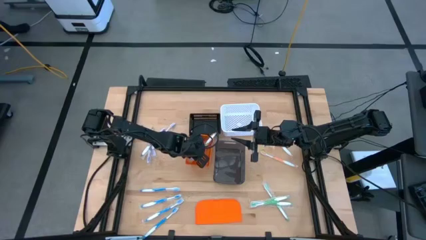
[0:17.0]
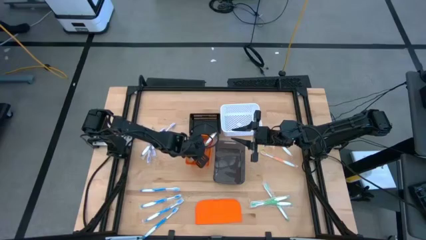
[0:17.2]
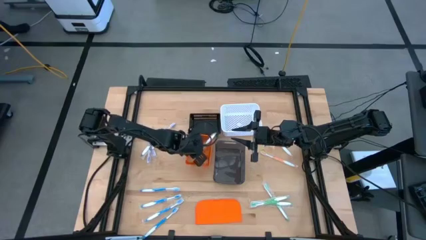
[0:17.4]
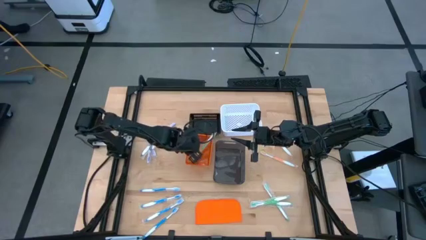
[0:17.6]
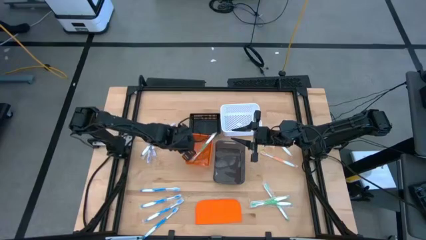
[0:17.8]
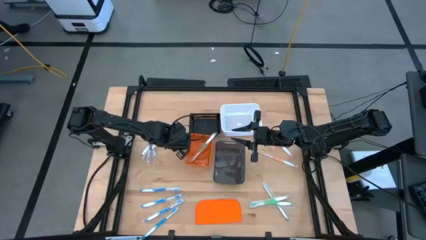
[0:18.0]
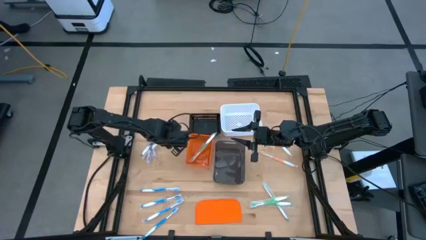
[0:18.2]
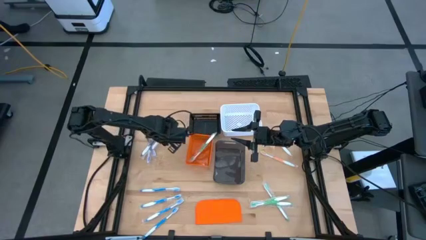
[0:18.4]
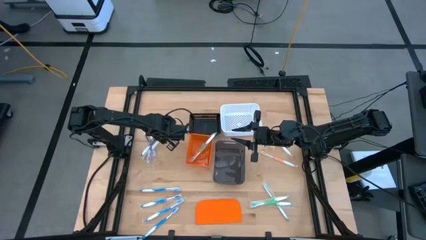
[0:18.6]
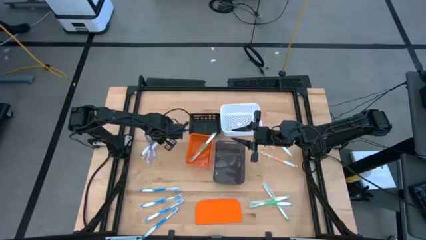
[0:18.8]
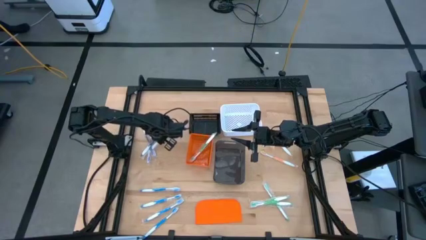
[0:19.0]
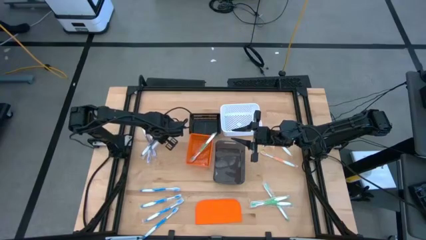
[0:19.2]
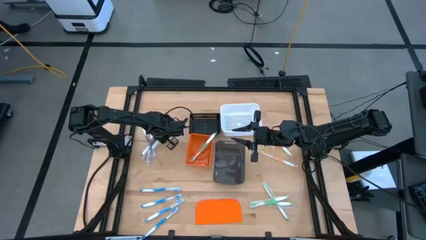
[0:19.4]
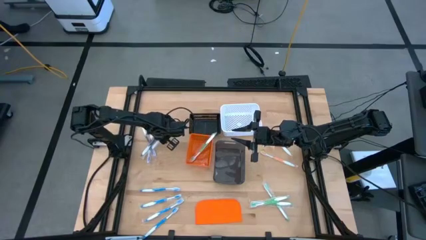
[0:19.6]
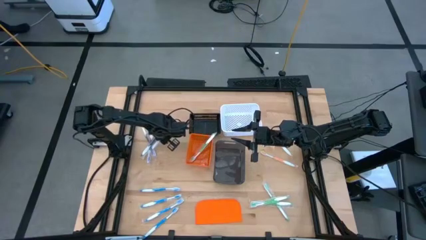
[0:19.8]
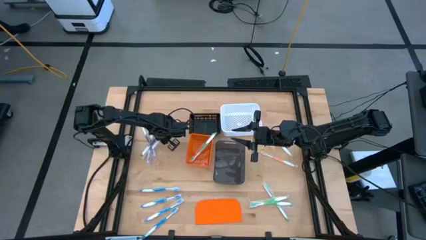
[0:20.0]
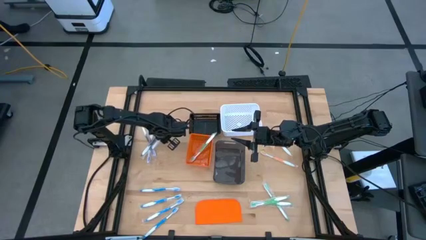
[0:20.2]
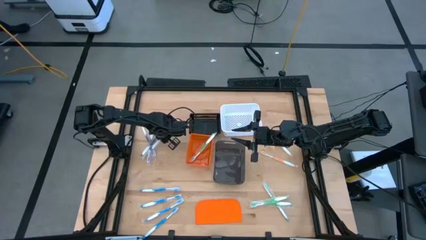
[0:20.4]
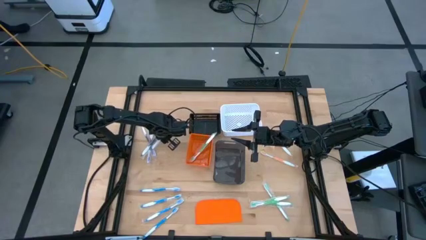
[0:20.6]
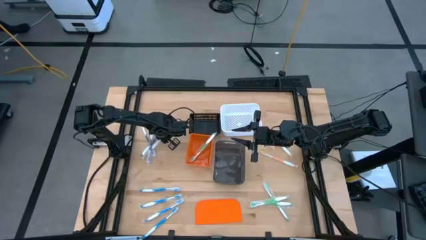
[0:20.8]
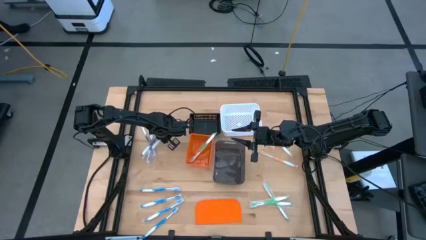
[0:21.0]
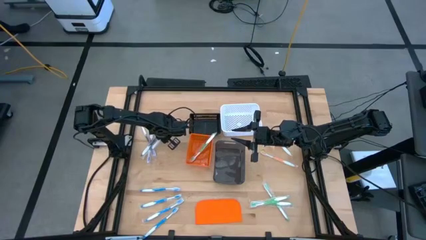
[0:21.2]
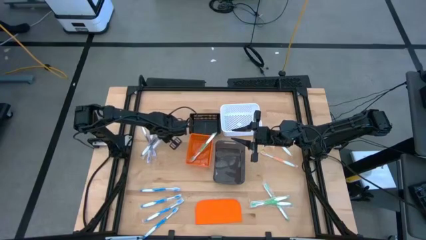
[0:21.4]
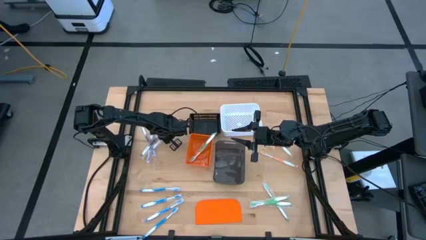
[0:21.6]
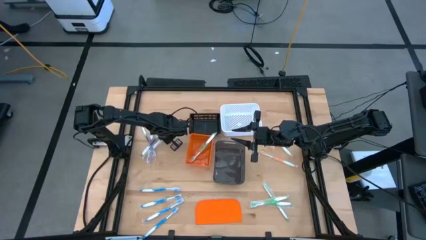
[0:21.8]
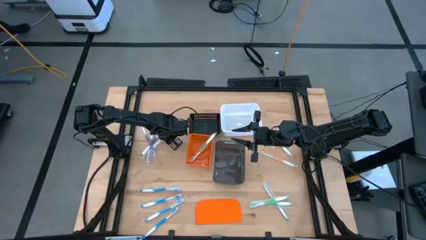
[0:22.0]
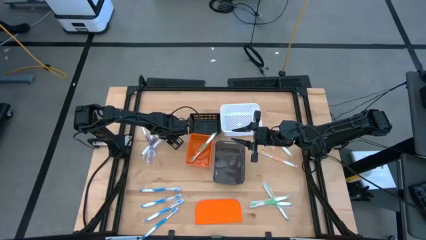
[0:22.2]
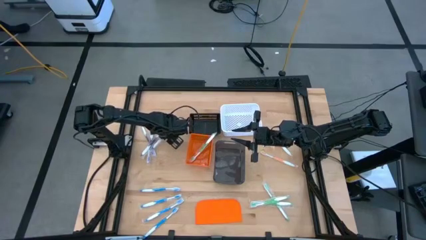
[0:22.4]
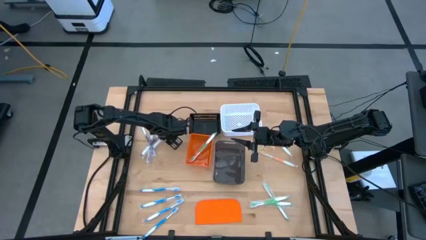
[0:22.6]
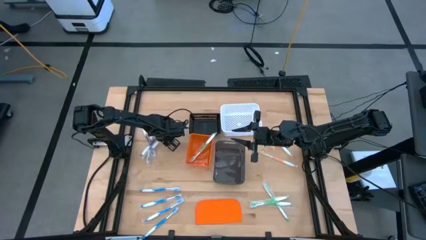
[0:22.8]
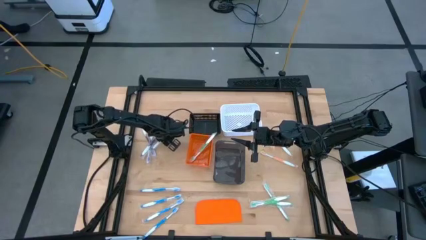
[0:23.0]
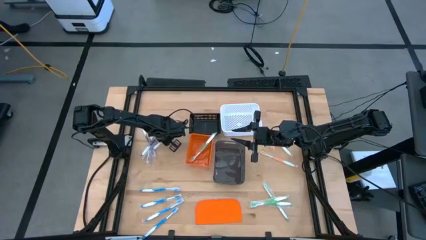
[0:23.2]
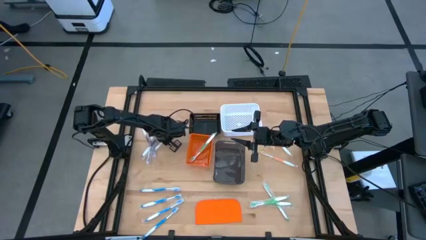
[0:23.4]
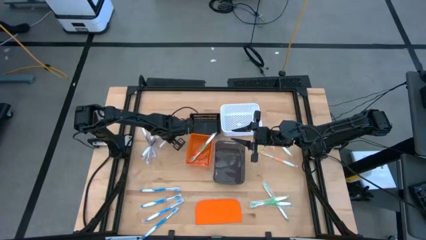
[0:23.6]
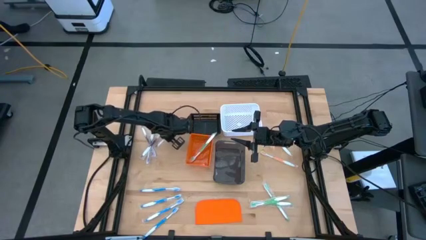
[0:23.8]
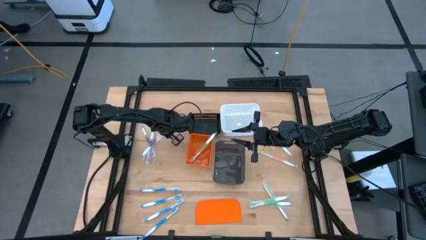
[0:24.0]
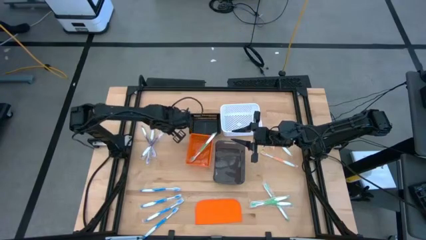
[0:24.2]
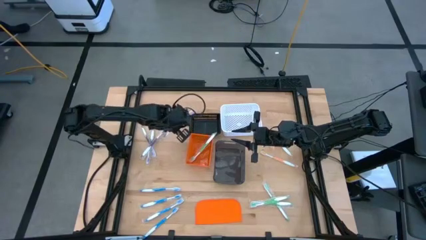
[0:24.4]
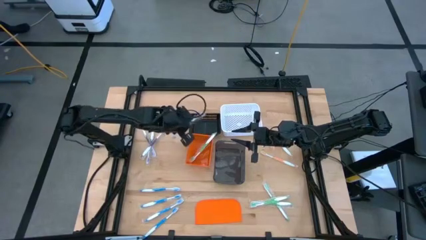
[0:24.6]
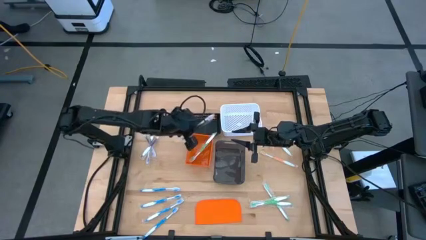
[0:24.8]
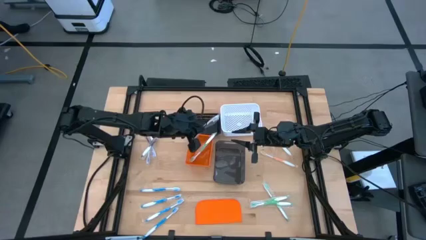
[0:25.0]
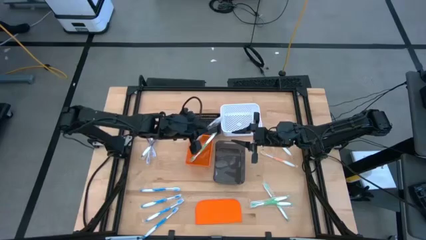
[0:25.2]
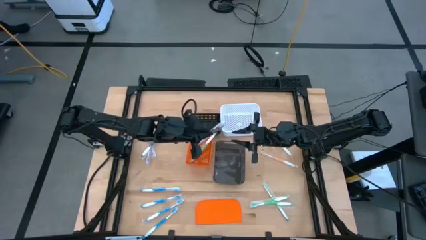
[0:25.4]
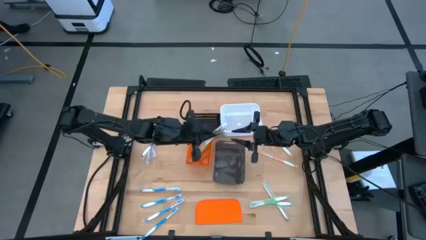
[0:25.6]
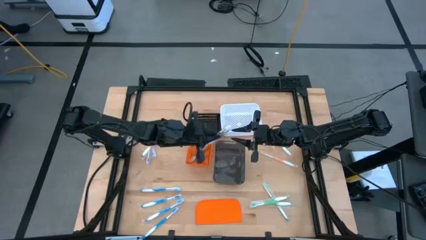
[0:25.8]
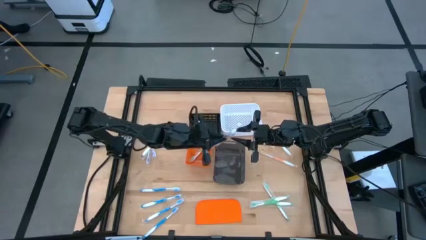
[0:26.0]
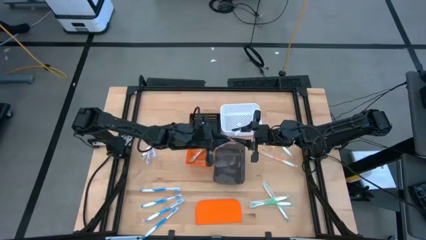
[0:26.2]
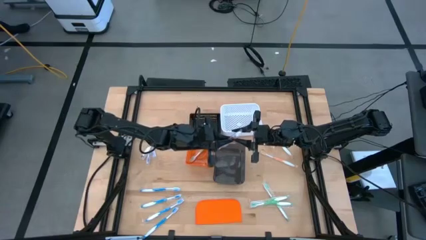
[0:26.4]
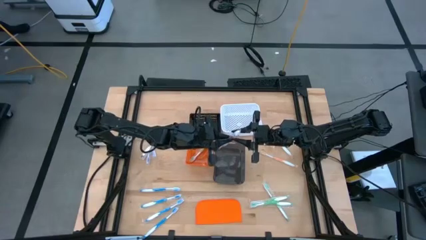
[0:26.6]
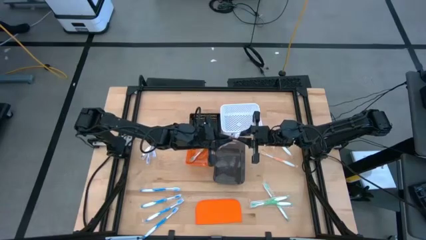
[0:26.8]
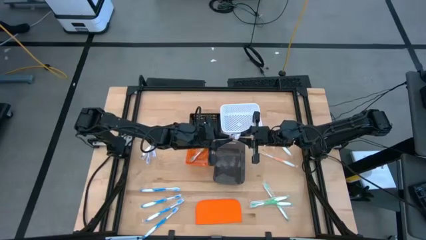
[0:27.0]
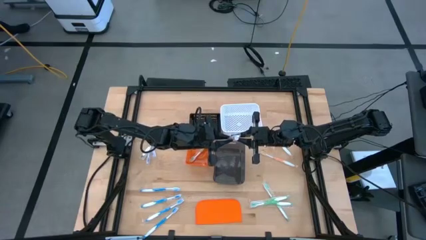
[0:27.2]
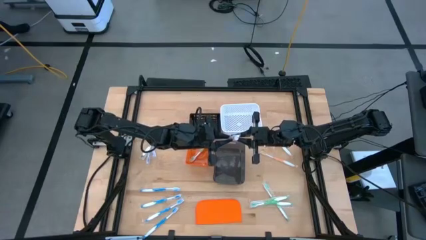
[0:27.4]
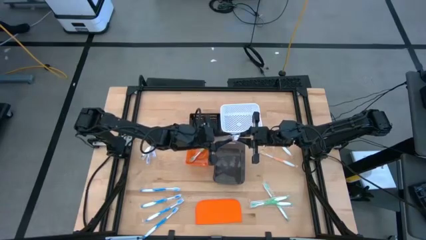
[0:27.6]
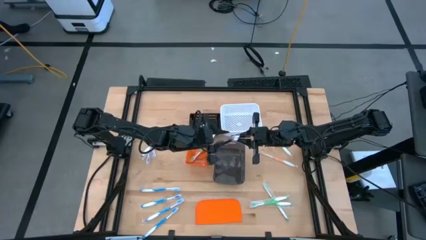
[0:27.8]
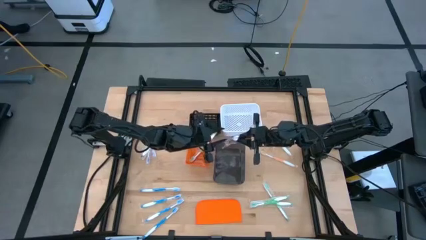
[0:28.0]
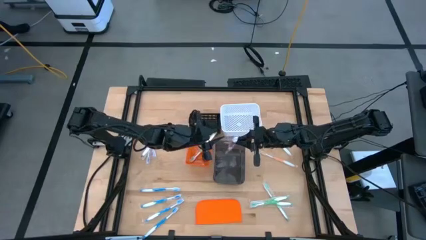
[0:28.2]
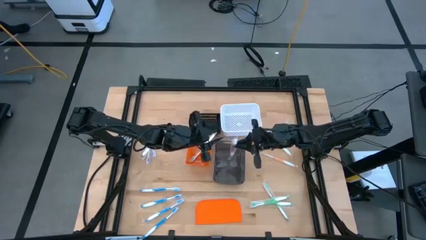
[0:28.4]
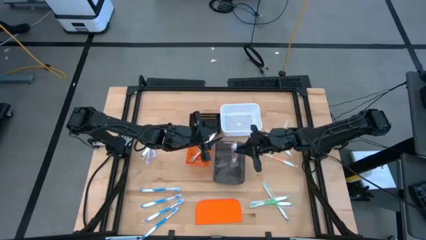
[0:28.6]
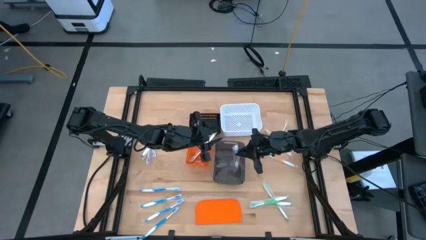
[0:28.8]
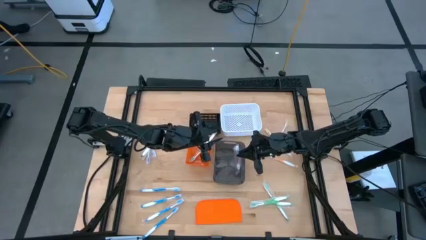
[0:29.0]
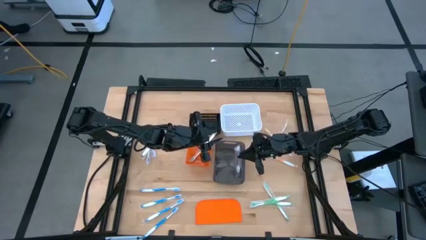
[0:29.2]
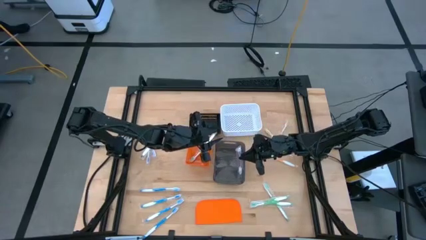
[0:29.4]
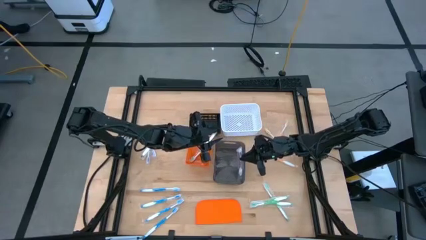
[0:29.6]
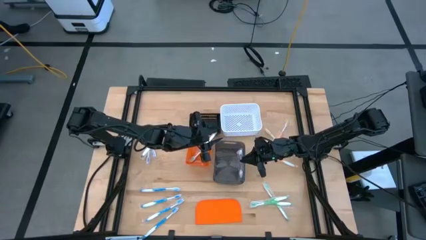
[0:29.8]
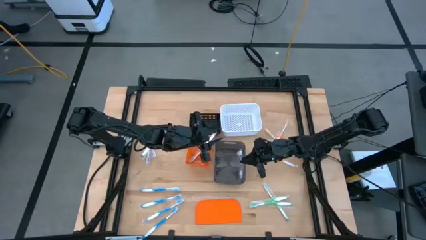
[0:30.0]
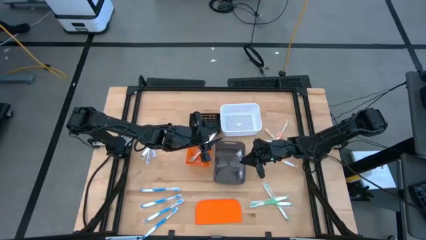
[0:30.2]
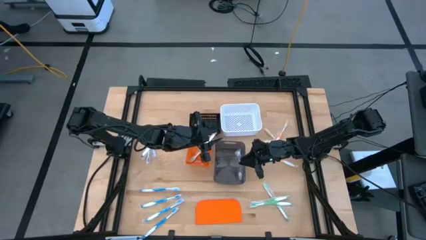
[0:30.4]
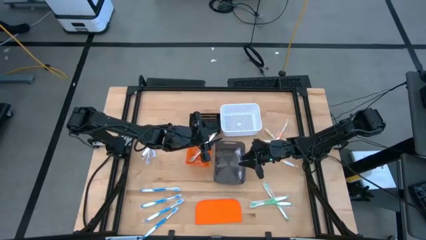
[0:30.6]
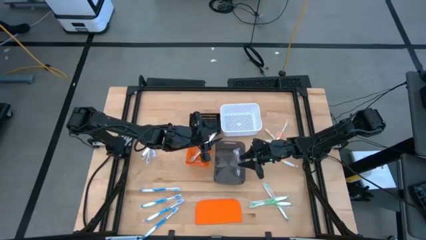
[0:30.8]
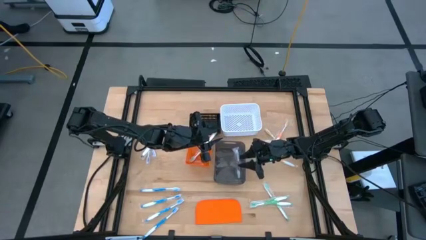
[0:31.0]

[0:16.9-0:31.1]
Task: Pick & Place Toothbrushes
Put the violet toothbrush into the transparent bin
